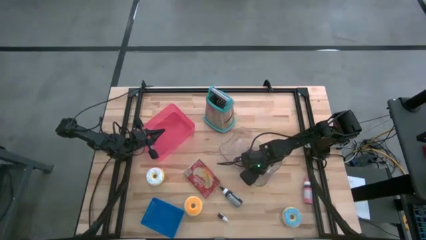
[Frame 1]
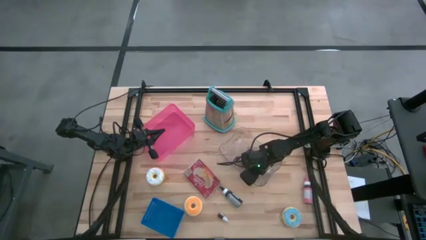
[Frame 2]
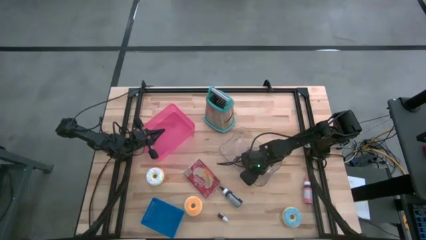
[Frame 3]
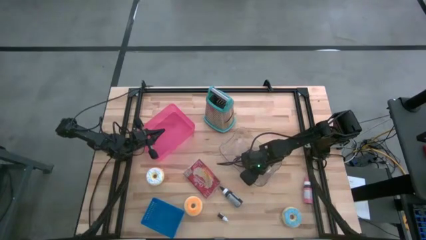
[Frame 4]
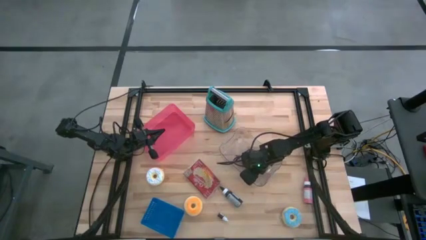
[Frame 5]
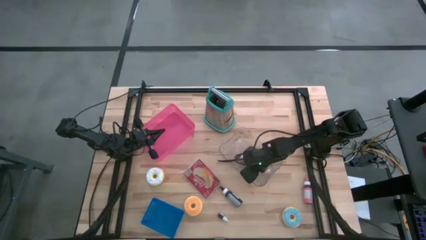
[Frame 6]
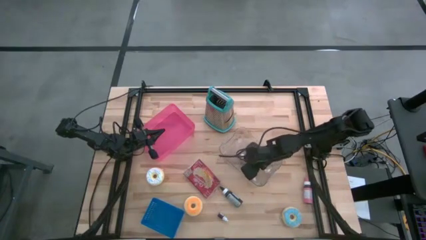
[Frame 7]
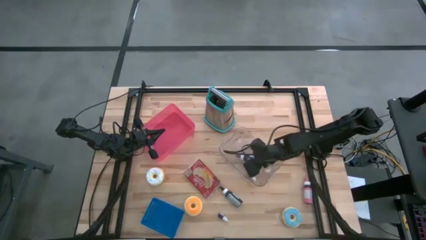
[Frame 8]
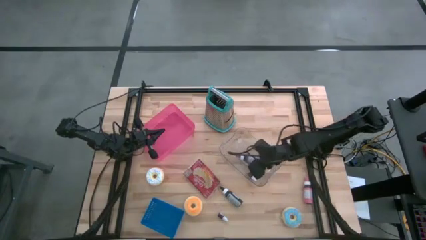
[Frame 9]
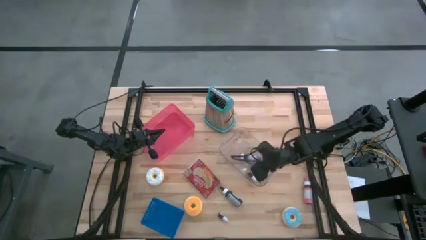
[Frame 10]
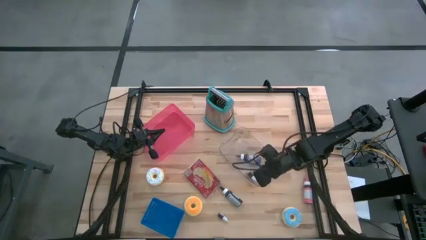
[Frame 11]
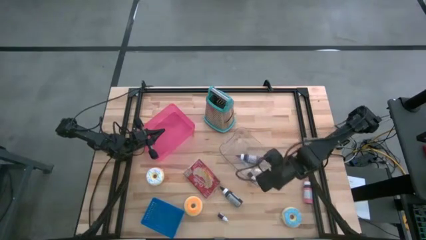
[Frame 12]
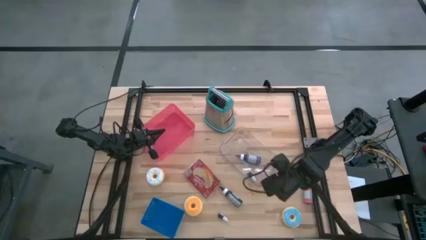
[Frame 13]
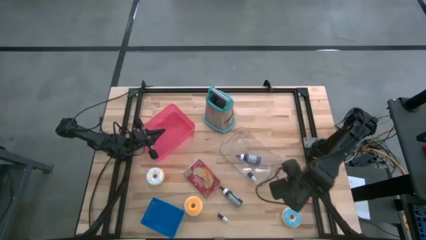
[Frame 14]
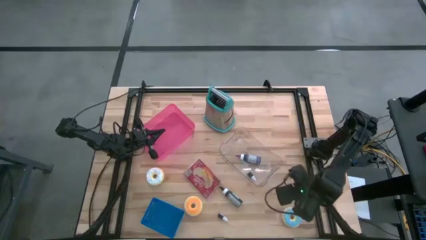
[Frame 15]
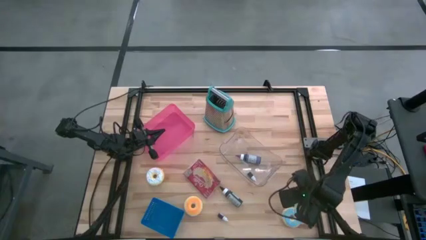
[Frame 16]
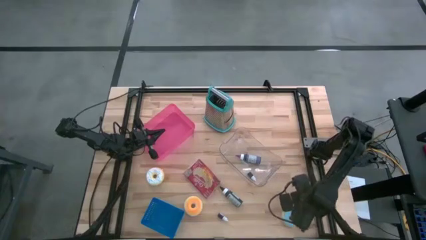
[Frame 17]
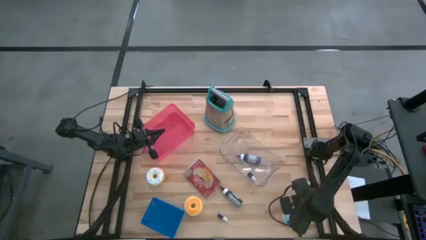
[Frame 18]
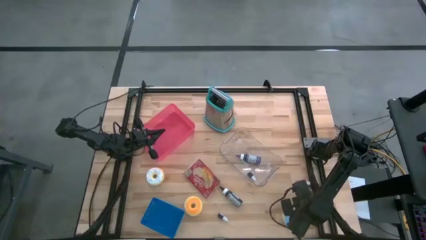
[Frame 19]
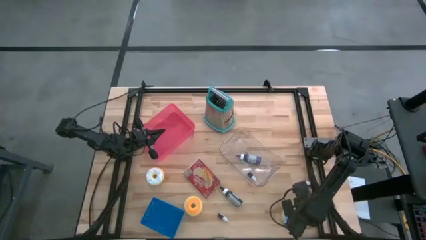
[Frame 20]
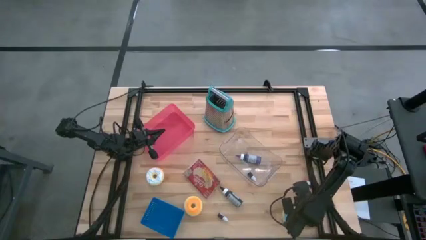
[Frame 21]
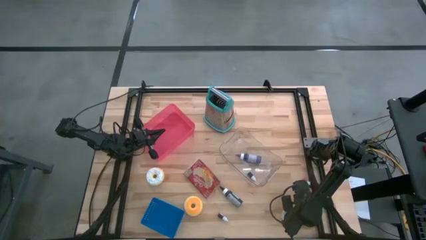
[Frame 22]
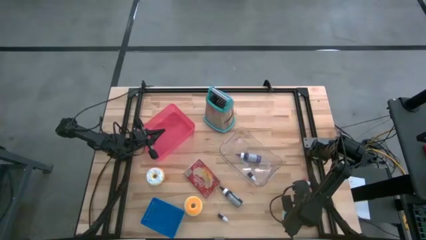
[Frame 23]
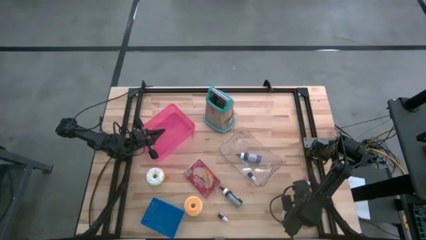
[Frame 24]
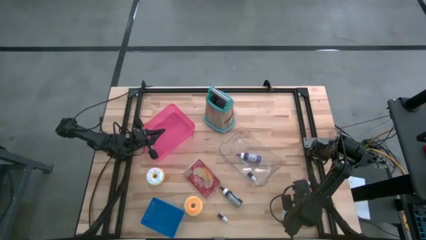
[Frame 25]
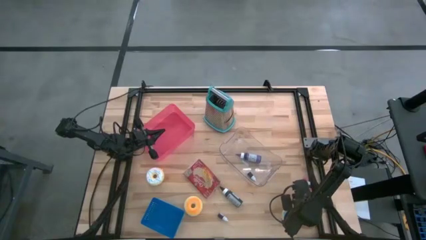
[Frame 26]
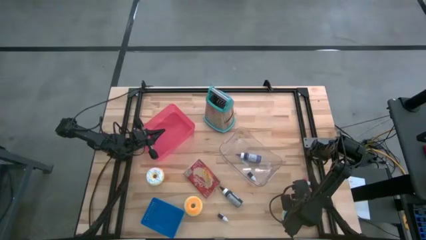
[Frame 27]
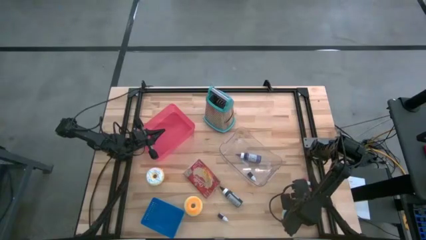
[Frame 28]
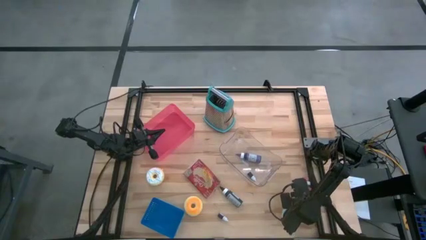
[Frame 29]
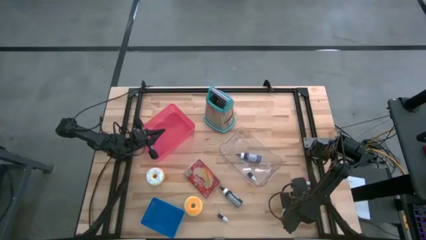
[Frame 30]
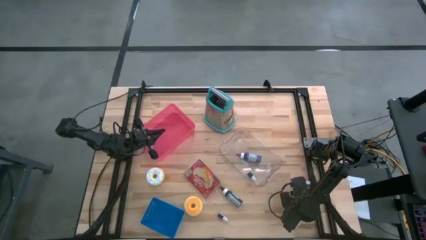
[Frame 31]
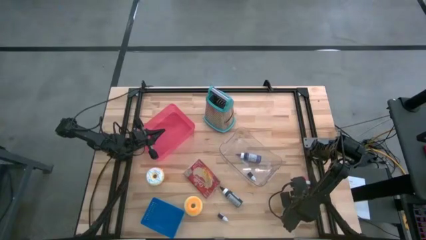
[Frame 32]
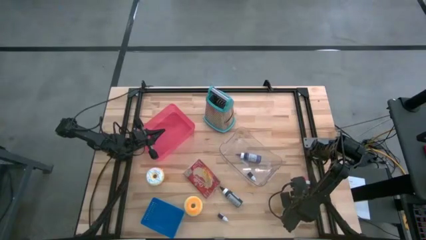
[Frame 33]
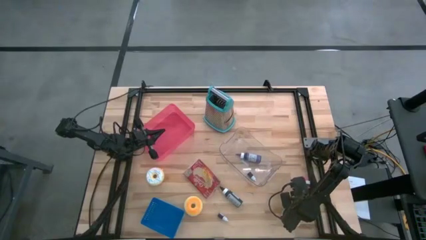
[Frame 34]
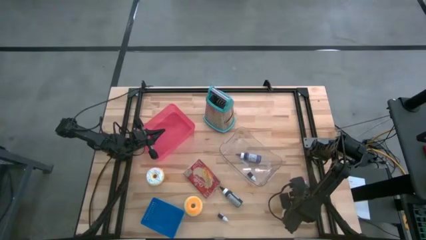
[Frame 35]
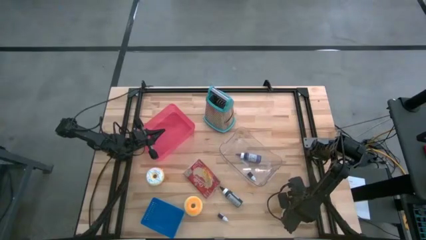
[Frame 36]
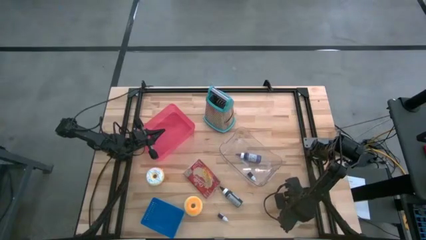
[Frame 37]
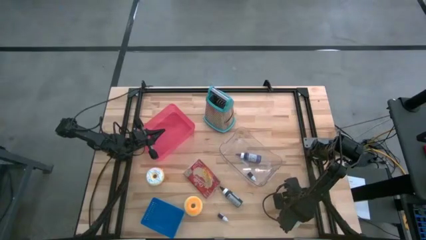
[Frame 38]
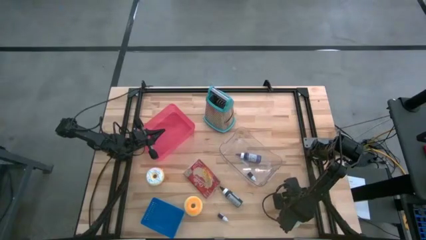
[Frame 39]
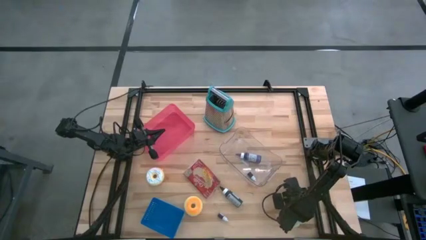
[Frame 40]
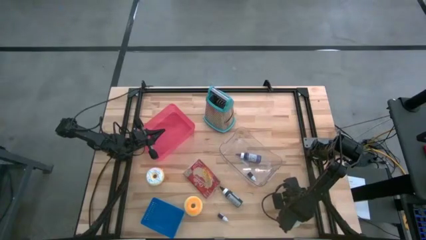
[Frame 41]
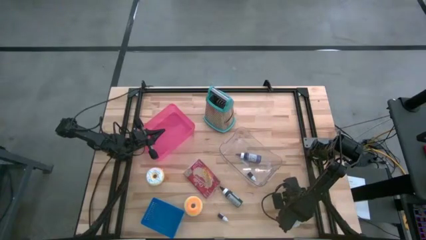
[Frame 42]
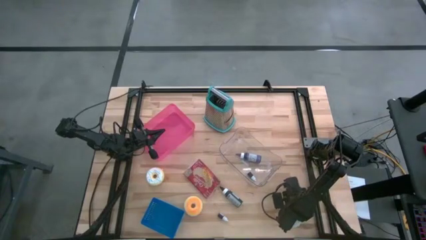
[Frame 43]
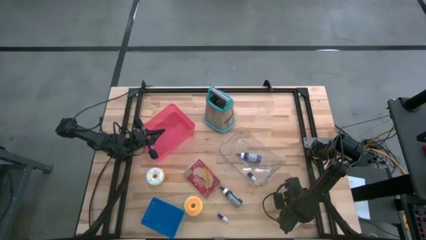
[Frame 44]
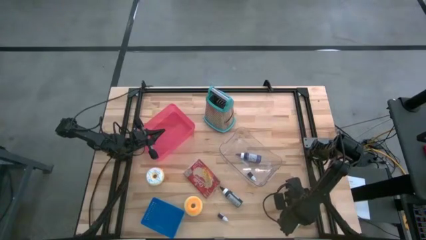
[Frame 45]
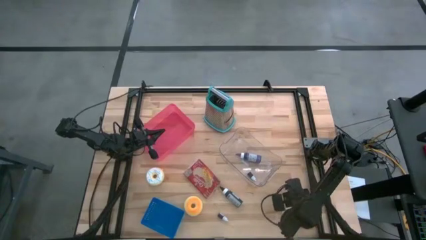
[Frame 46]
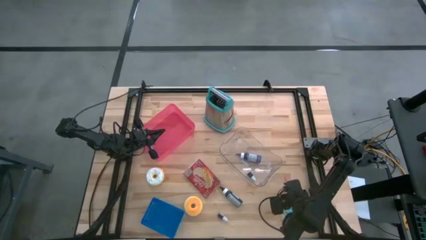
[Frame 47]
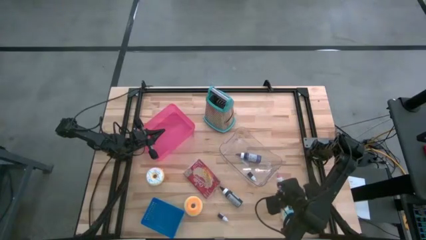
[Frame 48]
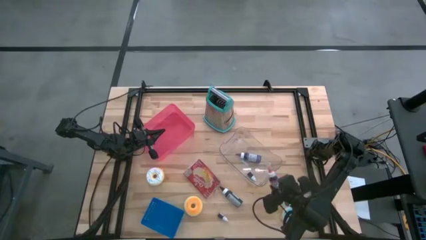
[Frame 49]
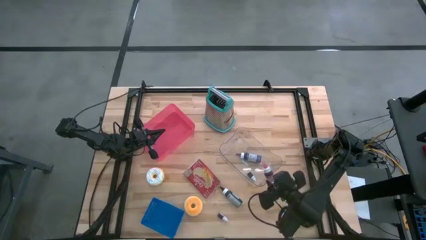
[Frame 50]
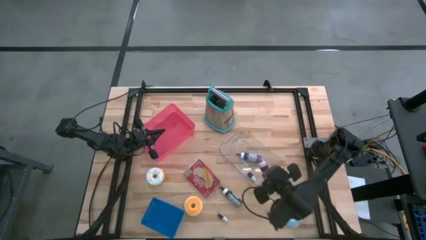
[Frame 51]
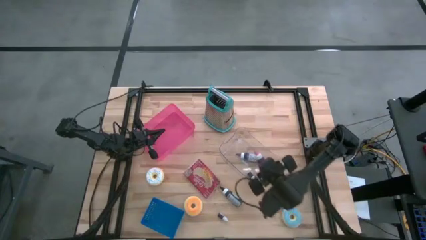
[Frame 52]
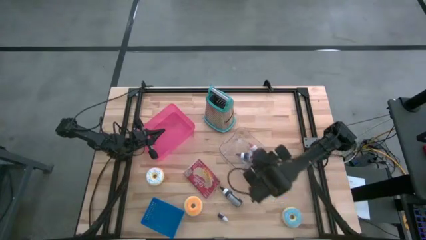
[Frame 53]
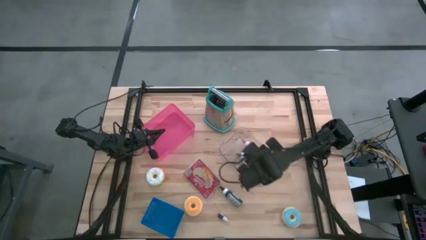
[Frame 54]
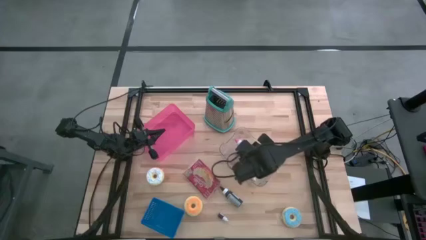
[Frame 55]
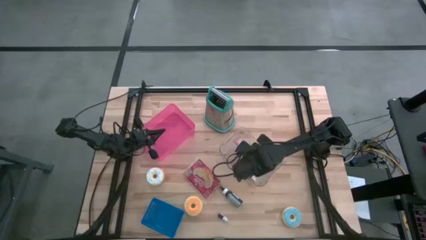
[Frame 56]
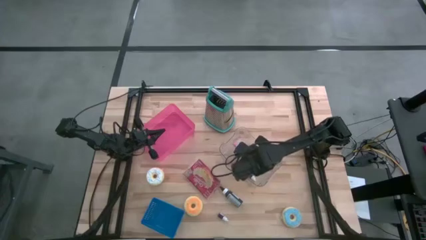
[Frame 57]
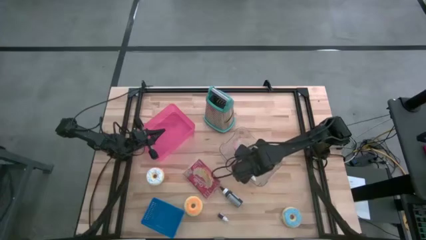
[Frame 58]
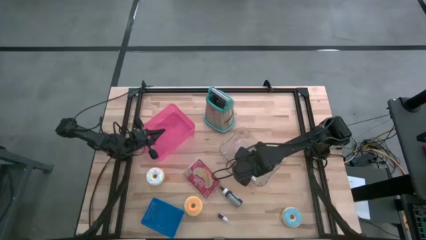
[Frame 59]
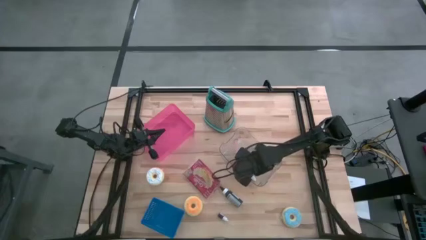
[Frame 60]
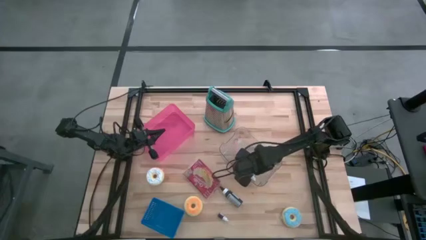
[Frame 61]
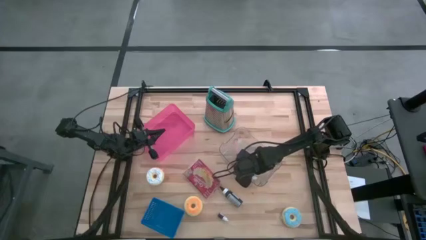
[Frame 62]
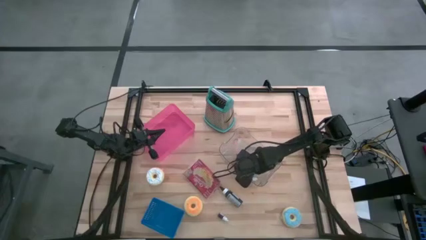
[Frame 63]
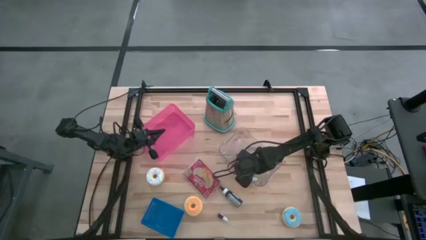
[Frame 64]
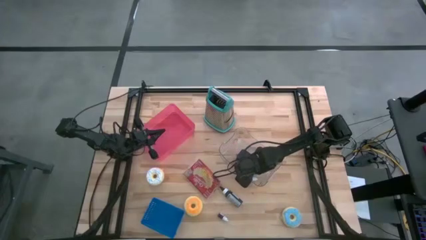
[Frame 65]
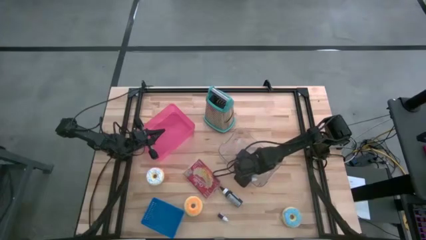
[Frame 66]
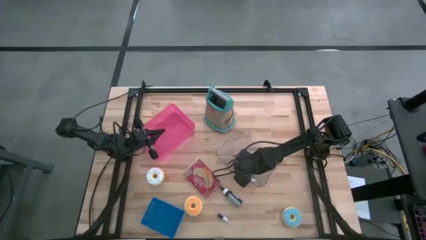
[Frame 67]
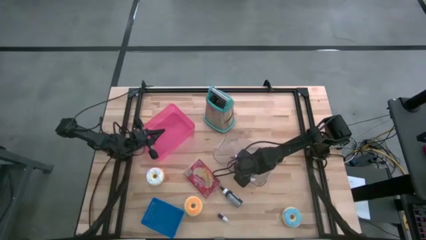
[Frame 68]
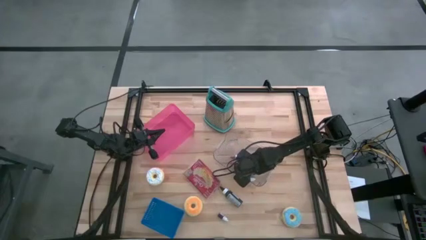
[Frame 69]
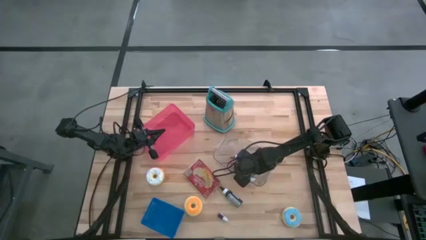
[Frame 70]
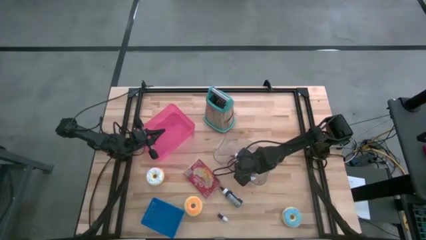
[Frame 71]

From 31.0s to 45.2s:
Task: Pick & Place Food Item
Put the large pink food coloring bottle into the transparent bin
